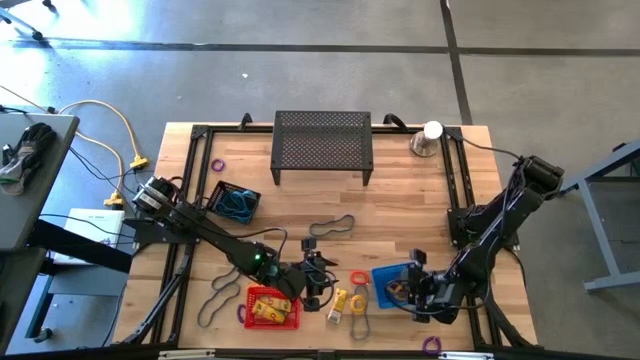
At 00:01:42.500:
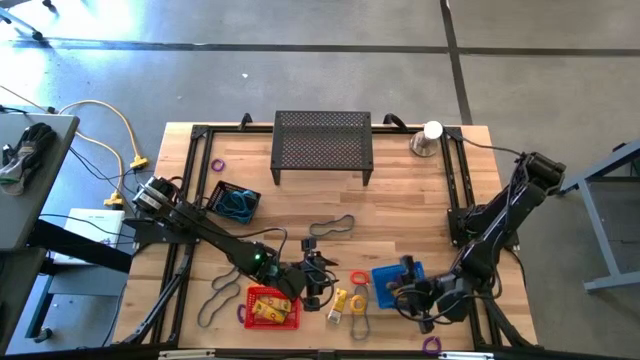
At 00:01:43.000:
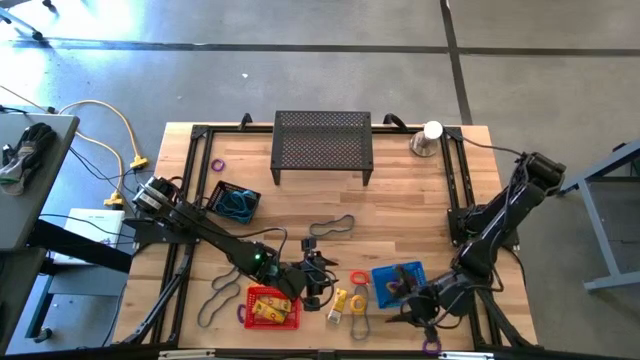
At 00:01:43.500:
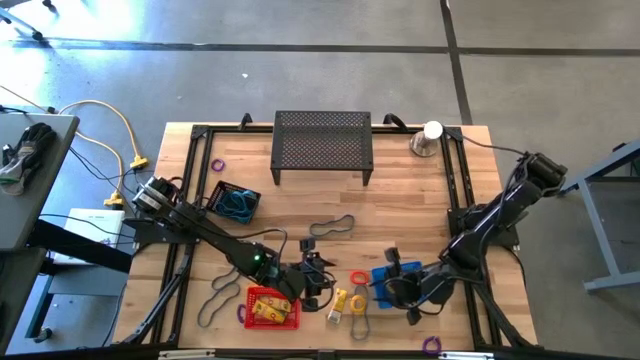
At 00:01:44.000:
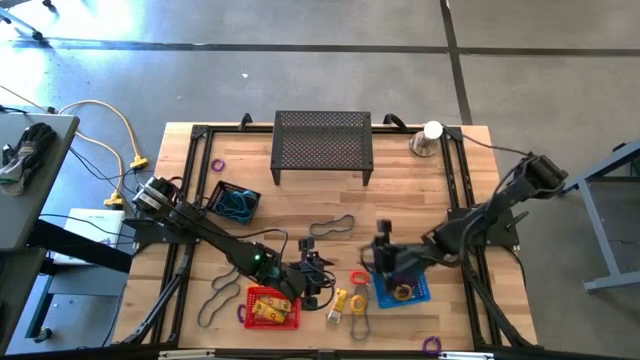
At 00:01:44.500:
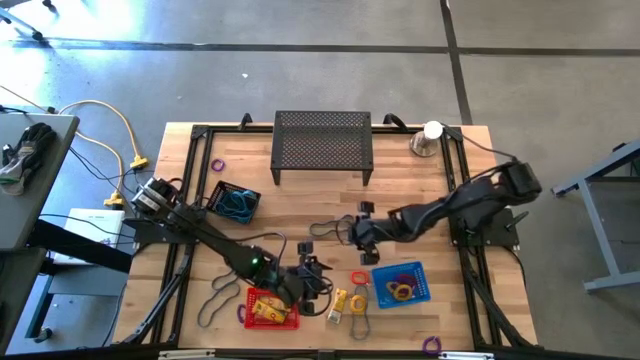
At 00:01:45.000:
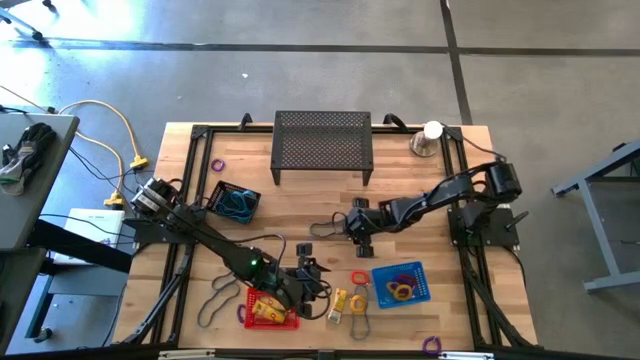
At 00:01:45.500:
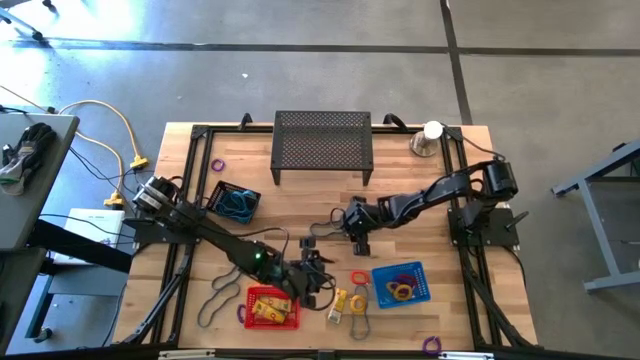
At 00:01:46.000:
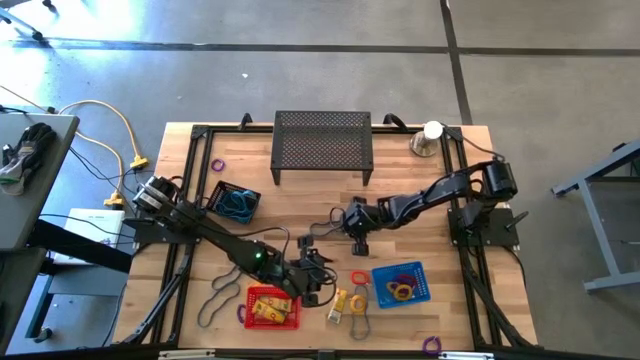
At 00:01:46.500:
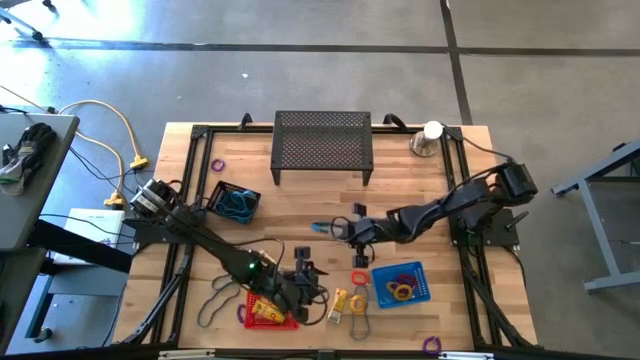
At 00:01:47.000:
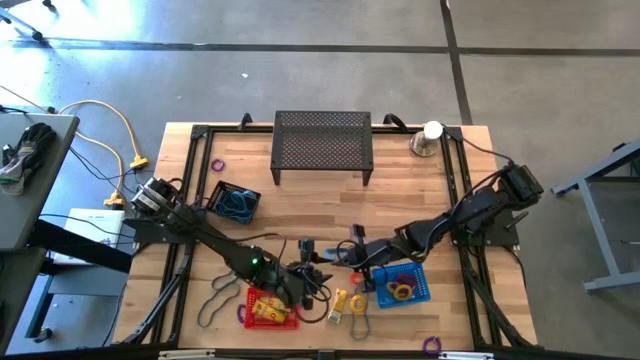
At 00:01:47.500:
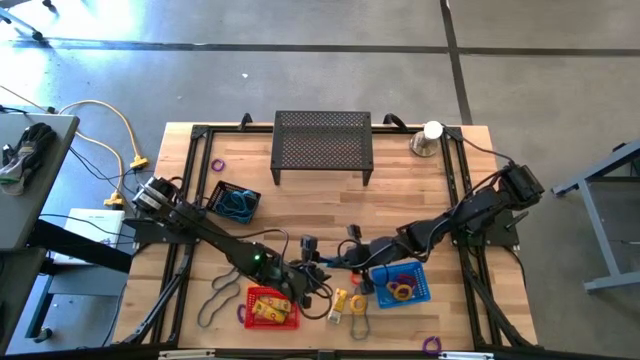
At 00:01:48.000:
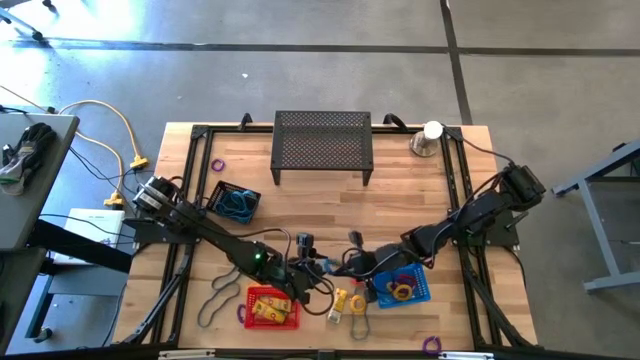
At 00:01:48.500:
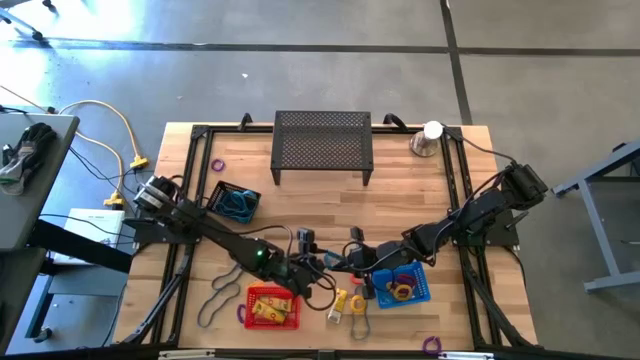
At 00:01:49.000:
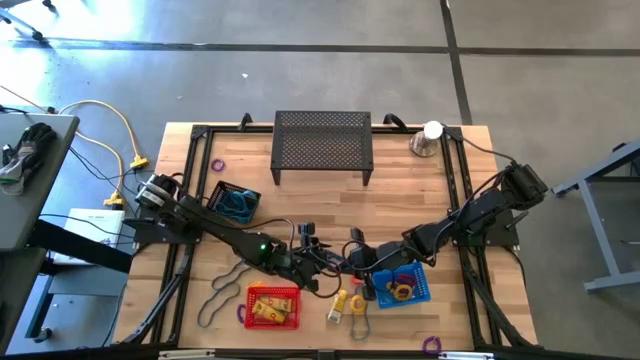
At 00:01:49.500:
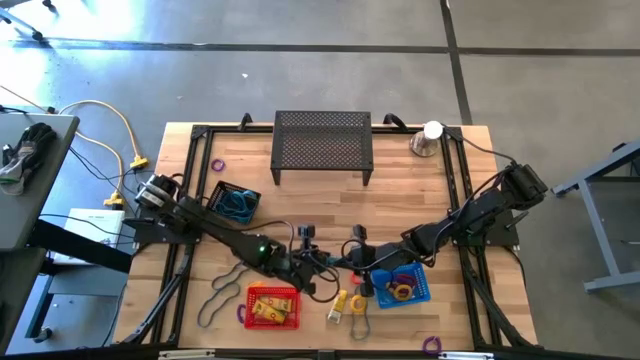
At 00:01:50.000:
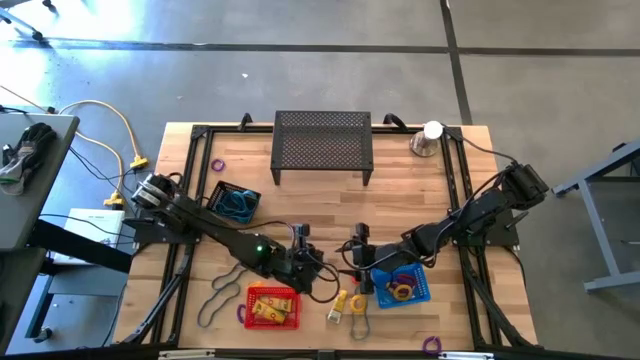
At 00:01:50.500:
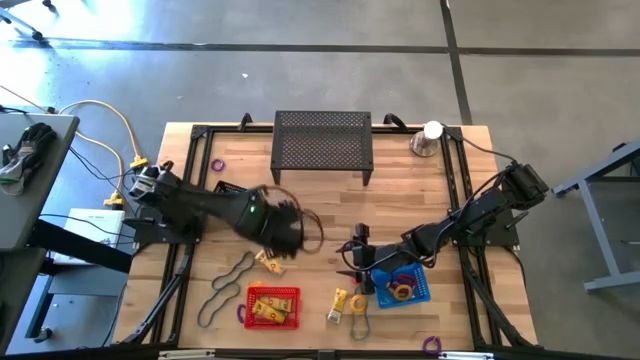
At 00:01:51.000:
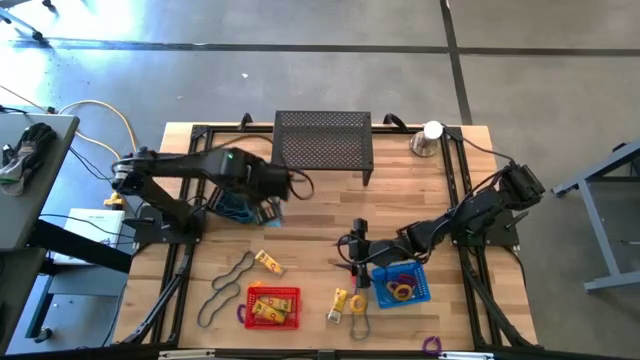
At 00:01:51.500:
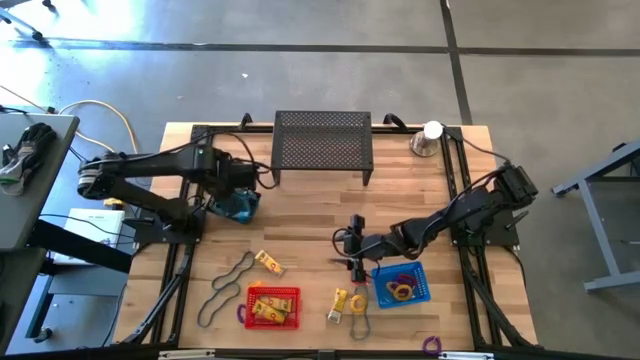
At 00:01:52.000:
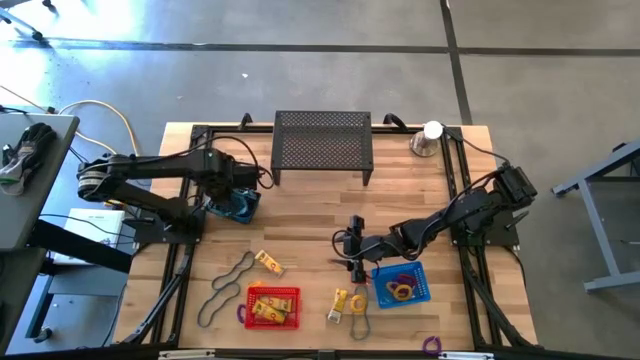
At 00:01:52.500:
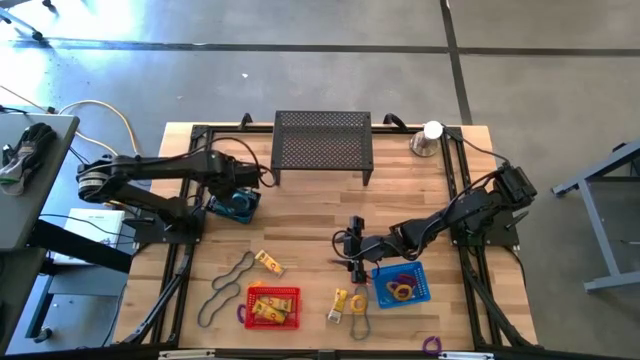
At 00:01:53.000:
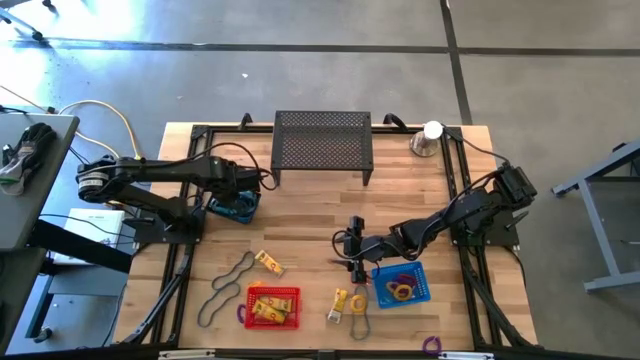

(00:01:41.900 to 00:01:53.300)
Task: Pick & Place Office Desk Supplies
Put the blue rubber band into the black bin

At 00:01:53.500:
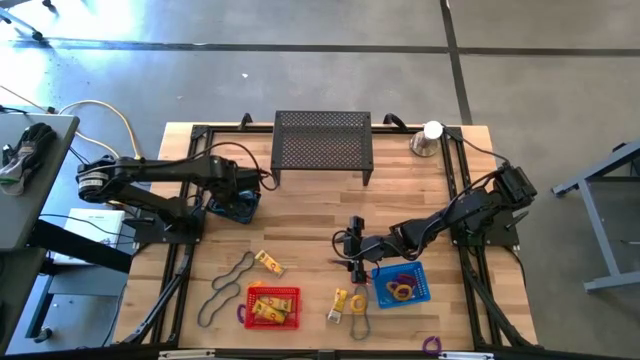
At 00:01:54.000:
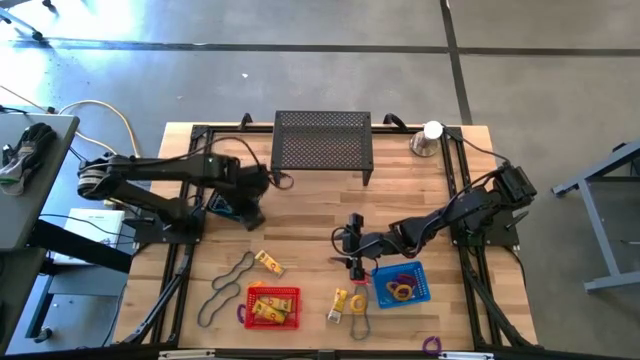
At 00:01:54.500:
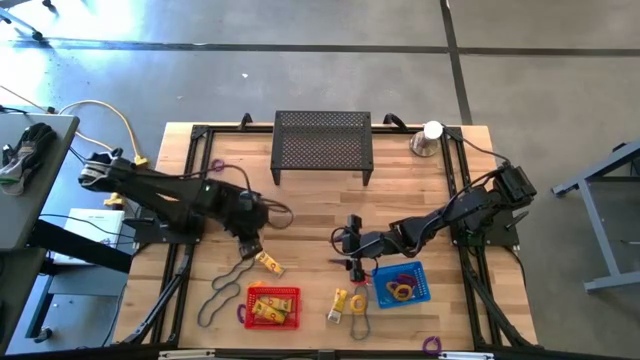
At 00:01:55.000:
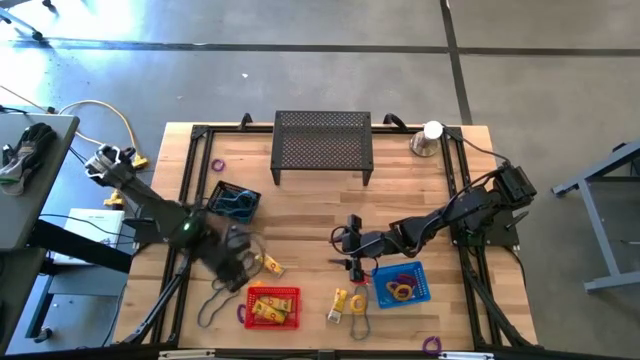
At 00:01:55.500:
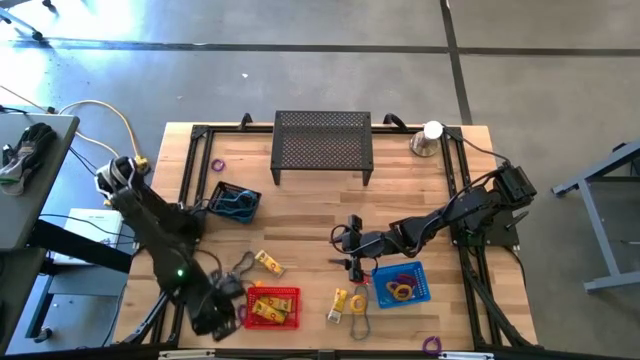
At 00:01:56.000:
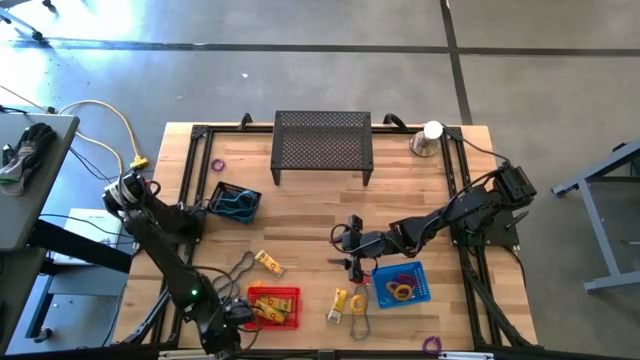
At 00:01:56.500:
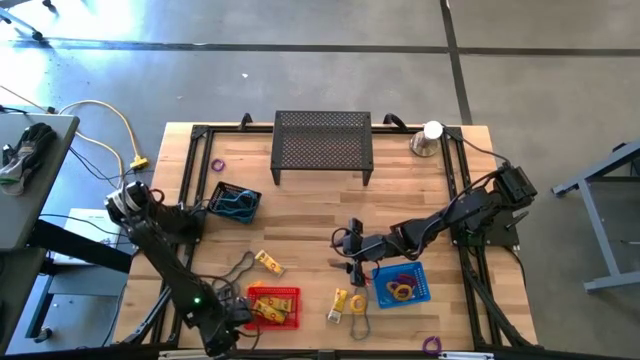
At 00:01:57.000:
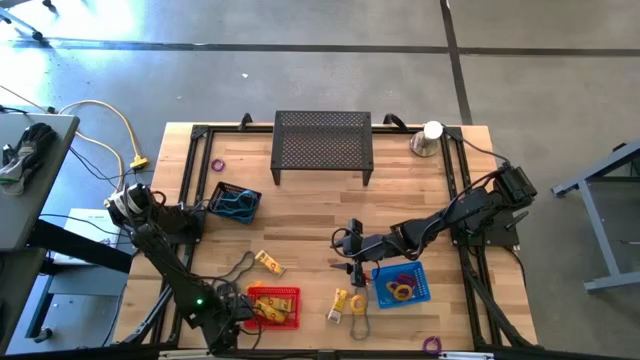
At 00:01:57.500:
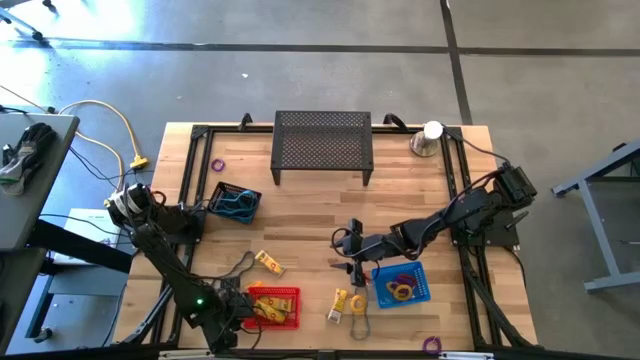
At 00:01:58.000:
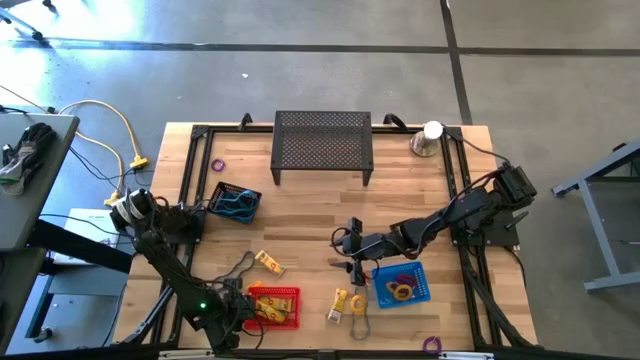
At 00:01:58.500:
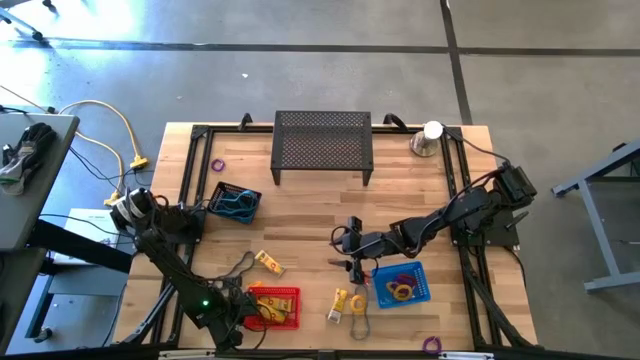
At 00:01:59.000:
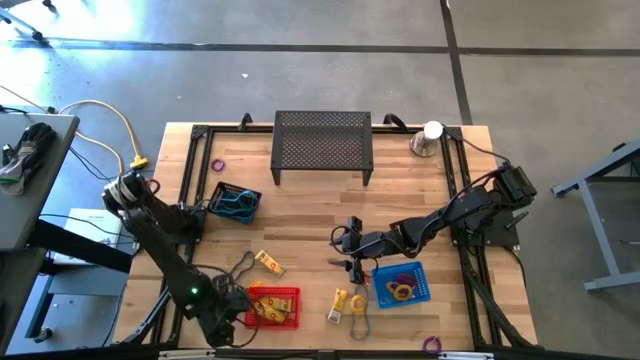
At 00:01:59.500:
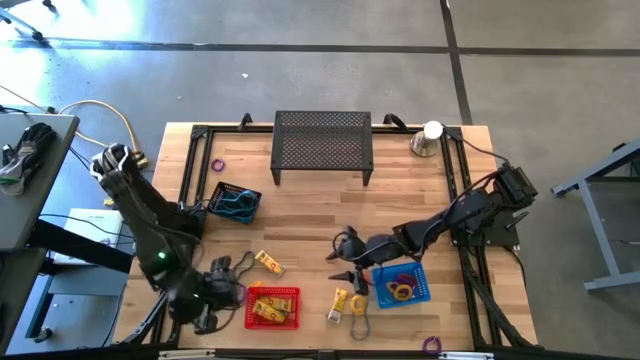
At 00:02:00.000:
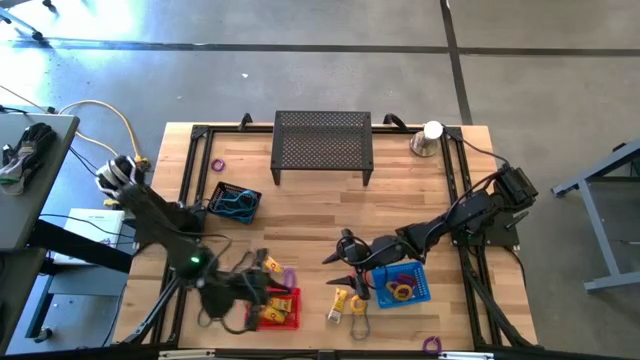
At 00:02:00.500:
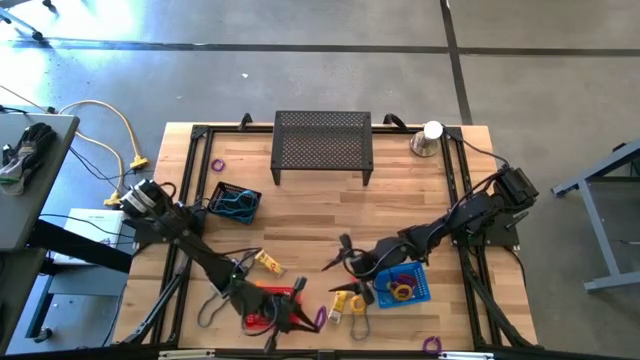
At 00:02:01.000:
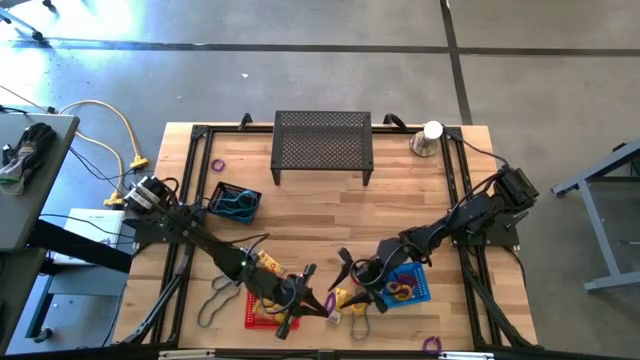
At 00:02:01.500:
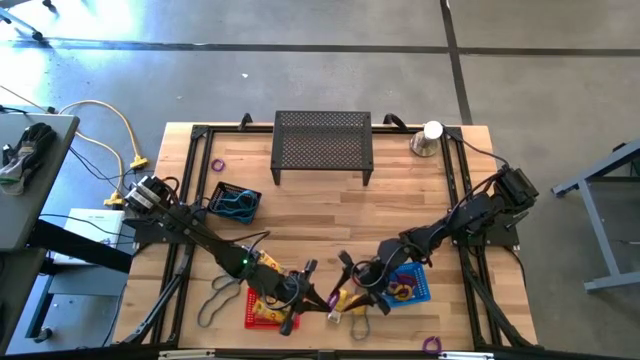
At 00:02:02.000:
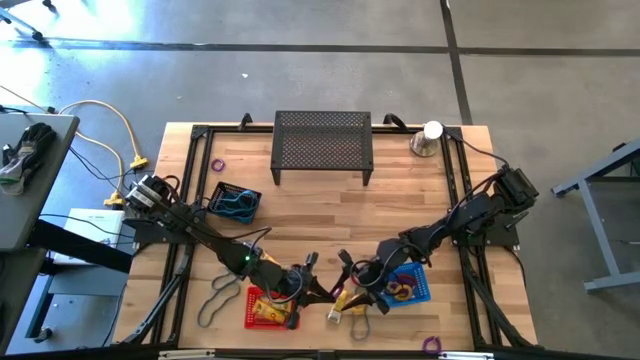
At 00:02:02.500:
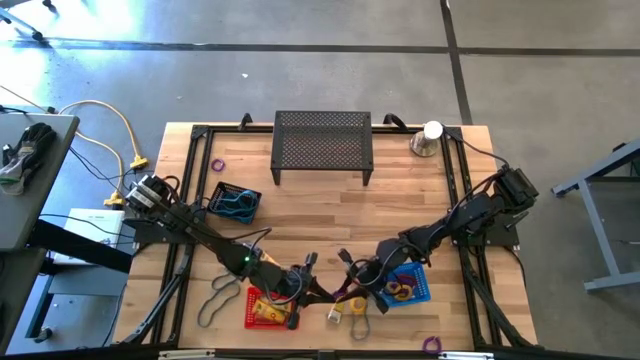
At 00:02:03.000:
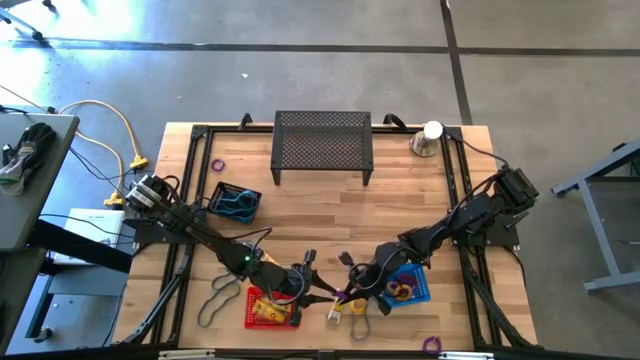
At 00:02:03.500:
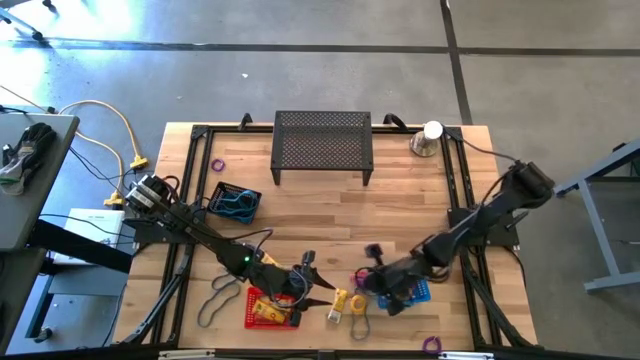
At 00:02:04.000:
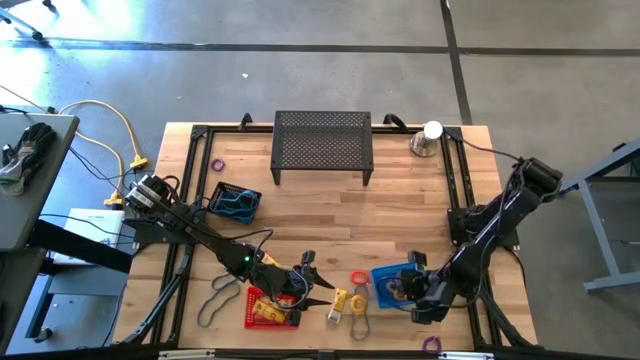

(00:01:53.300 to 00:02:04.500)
Put the violet spring keychain into the blue bin
